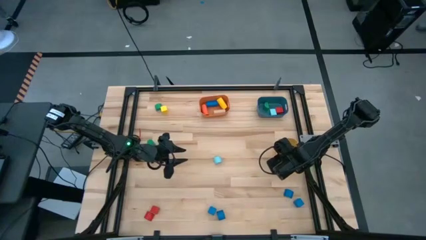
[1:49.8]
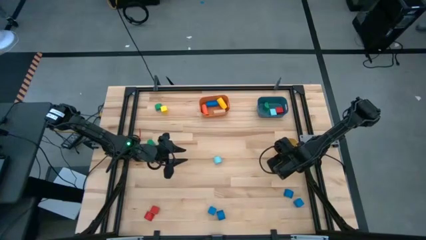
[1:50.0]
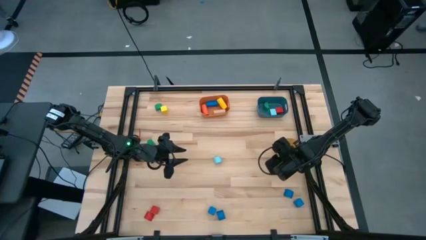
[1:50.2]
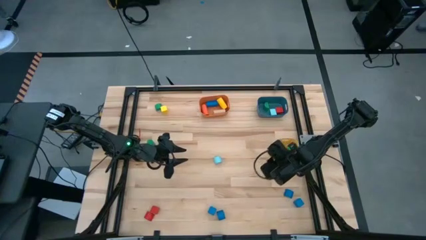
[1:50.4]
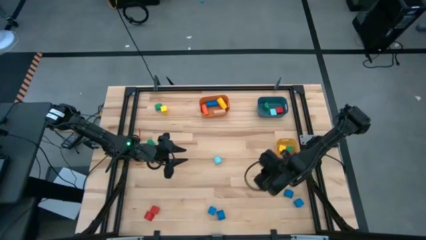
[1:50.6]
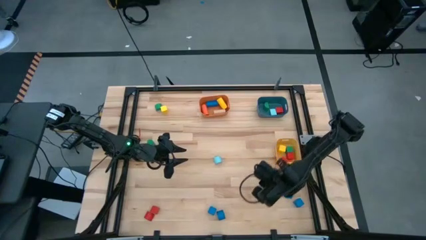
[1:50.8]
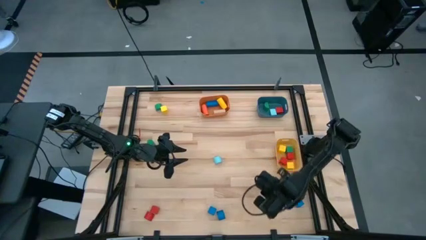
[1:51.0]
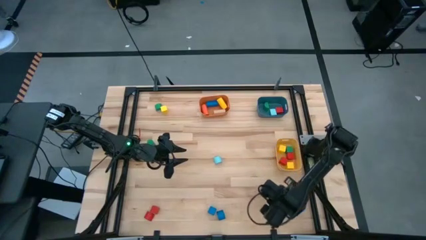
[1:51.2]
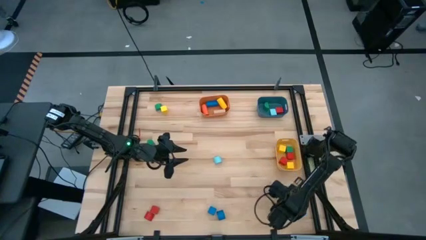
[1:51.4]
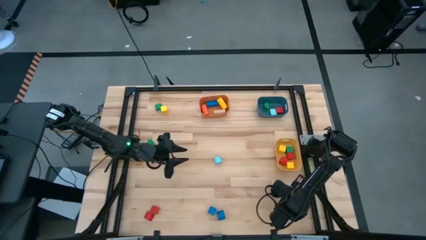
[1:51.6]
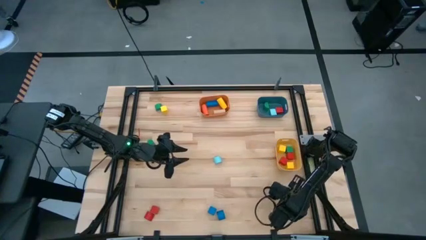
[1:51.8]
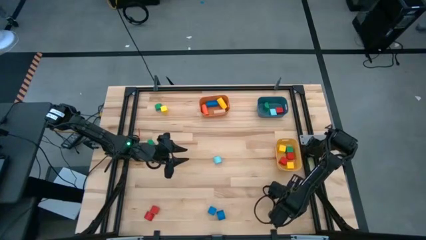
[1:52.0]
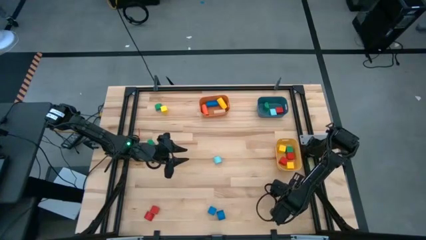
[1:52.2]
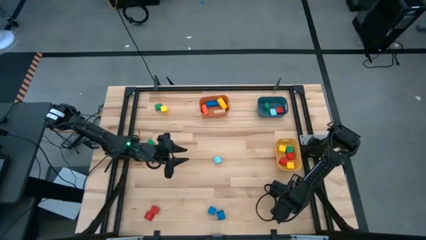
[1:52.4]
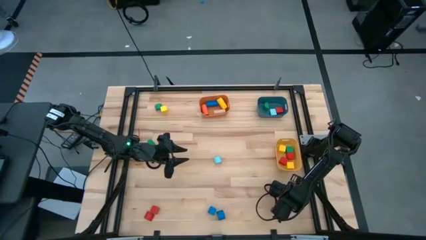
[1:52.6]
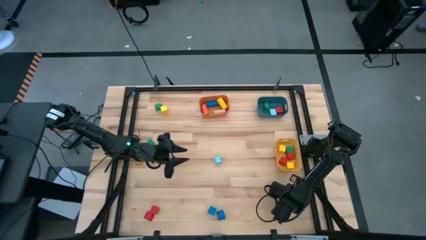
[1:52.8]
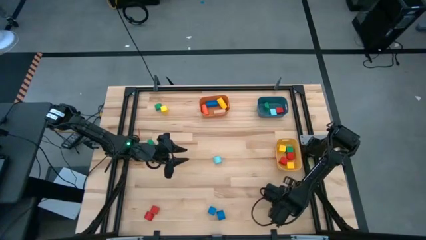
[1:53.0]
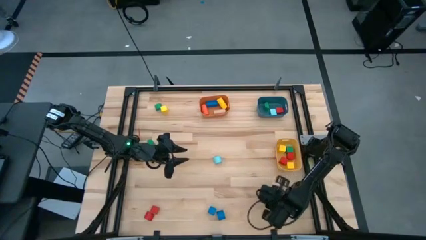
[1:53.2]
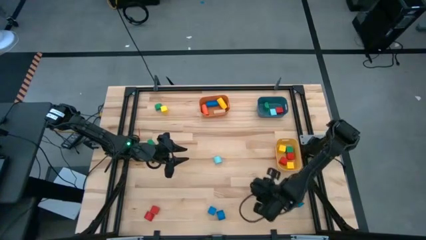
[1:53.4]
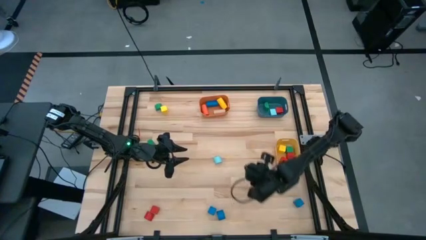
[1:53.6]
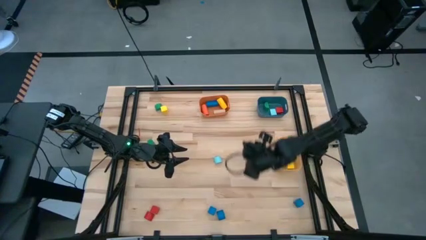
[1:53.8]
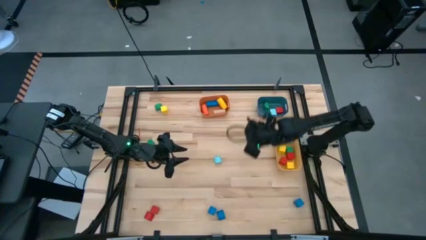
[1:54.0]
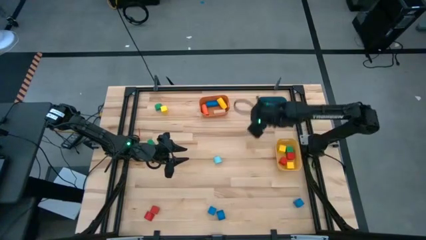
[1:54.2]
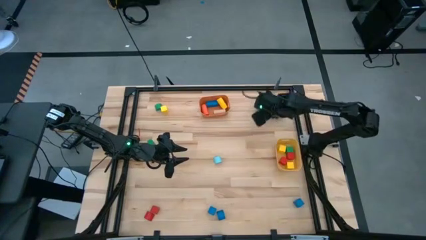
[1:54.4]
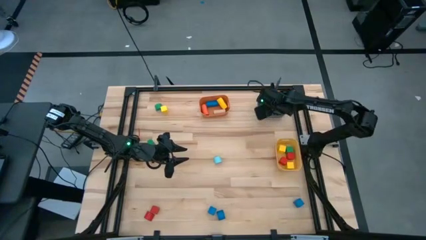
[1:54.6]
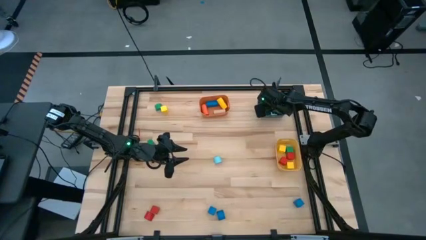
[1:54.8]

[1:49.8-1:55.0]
Task: Sort blocks by size
Put the blue half circle block into the blue bin

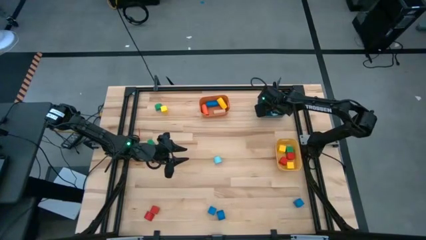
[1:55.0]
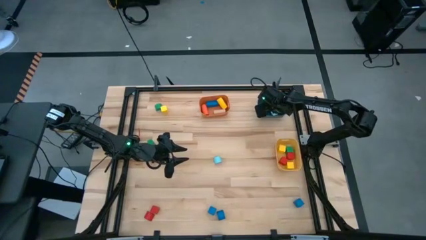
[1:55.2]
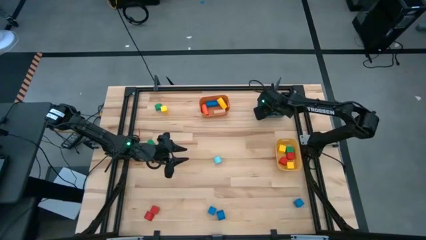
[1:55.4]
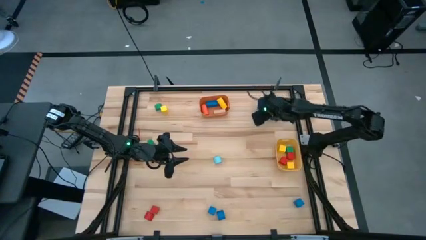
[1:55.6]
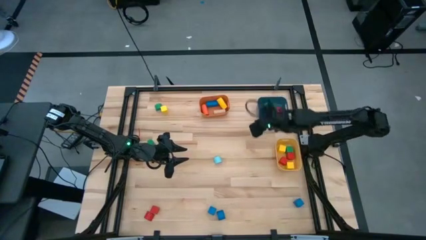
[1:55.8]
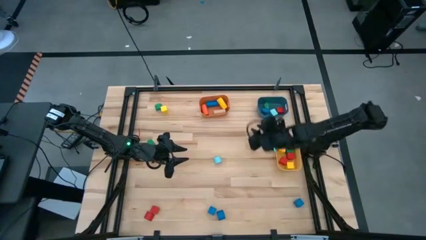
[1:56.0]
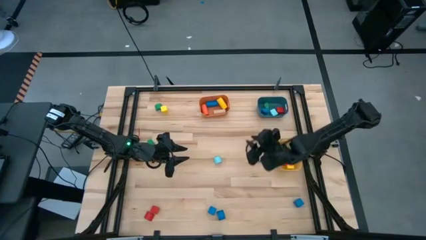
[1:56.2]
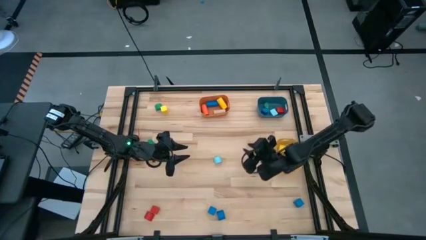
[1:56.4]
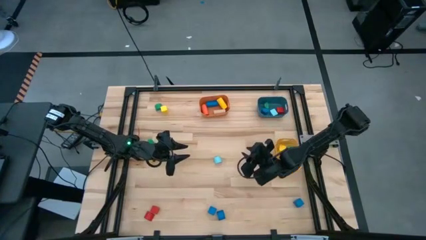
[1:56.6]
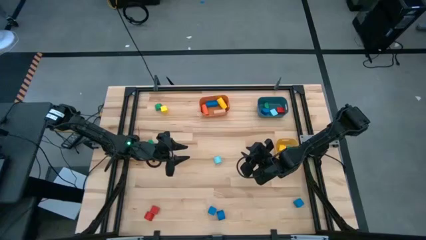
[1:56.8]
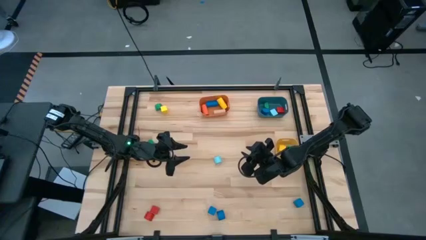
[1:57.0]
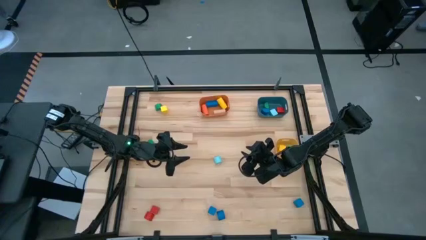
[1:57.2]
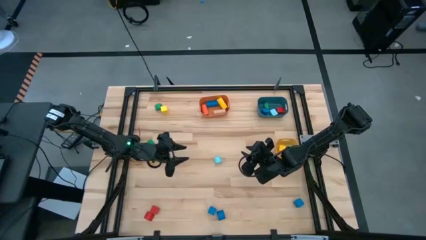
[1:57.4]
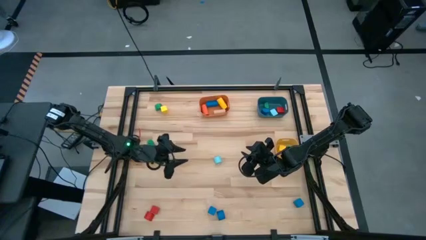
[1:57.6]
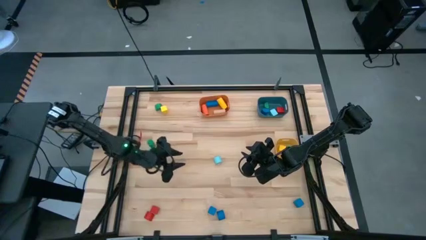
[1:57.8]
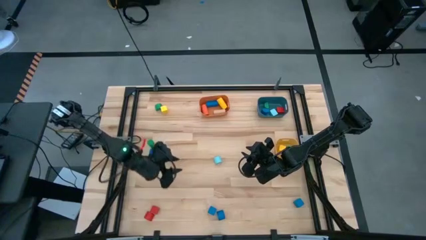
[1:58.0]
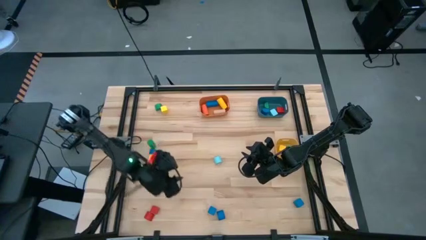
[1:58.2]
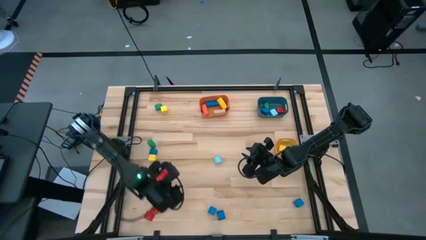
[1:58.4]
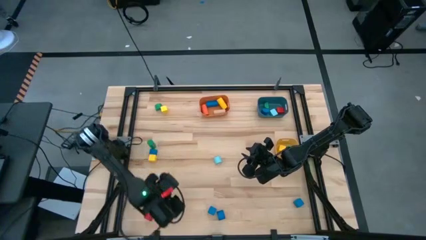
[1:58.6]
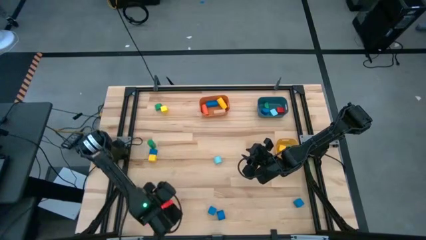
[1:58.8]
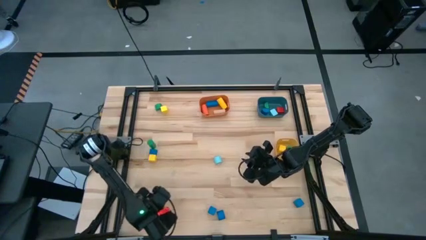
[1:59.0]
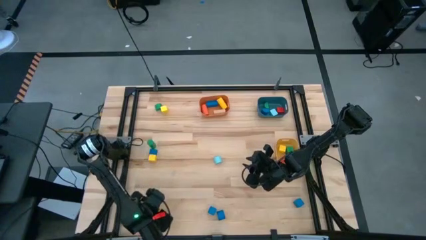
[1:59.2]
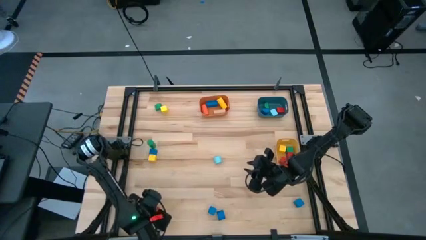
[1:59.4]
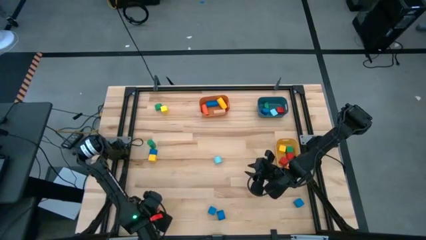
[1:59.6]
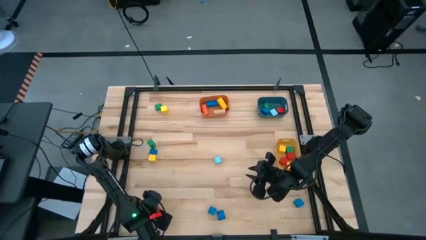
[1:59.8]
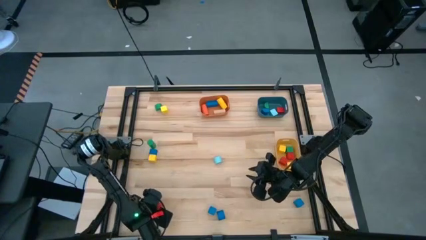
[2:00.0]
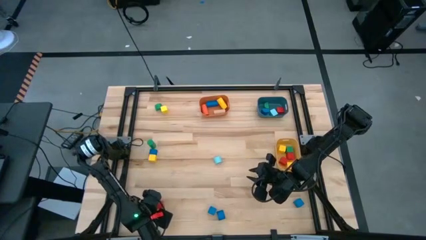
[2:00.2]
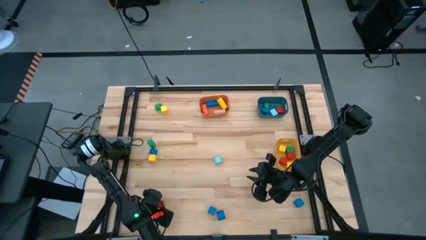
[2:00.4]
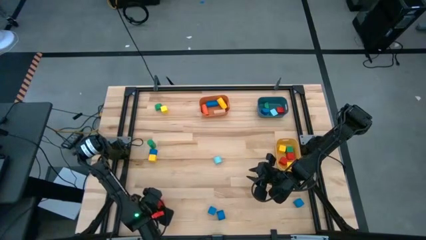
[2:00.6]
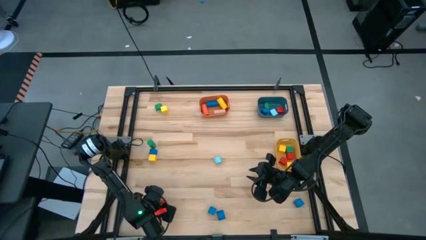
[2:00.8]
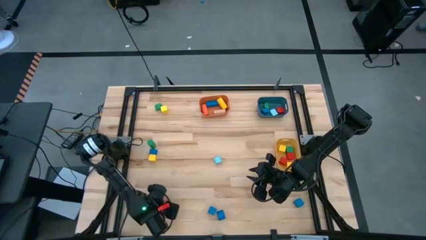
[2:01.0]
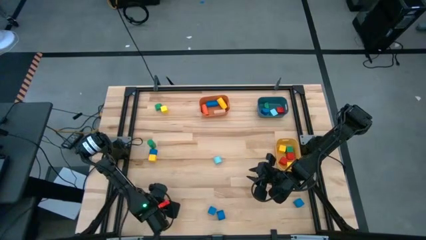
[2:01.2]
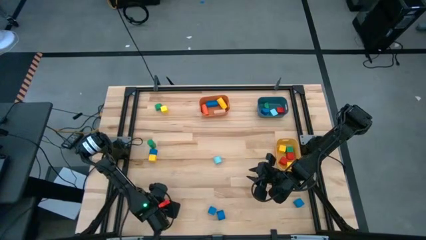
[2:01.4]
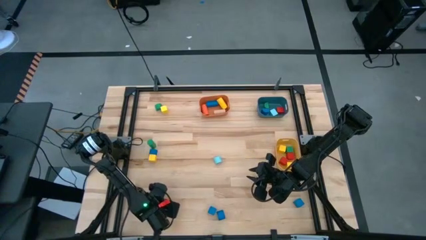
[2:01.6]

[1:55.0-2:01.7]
Put the red cube block into the yellow bin
